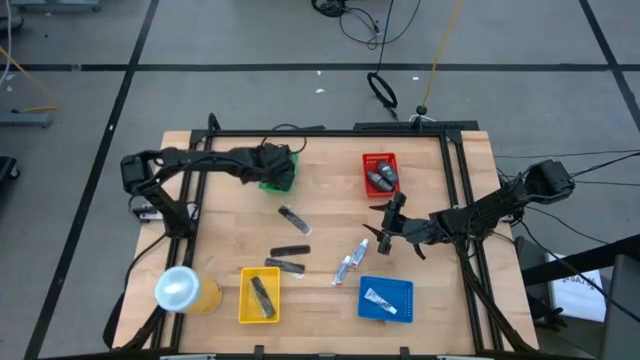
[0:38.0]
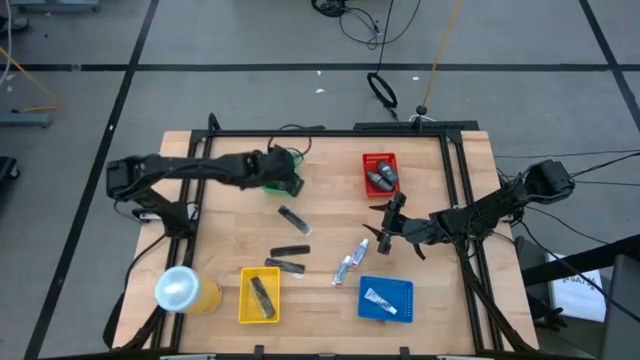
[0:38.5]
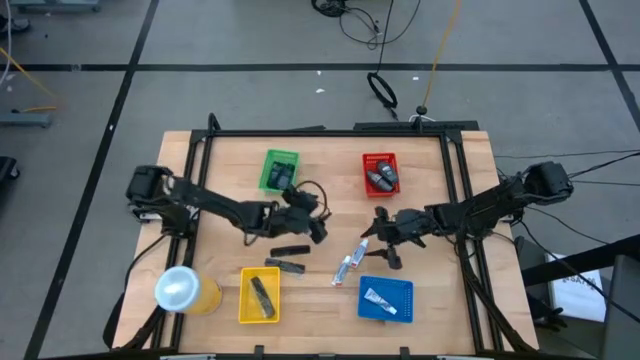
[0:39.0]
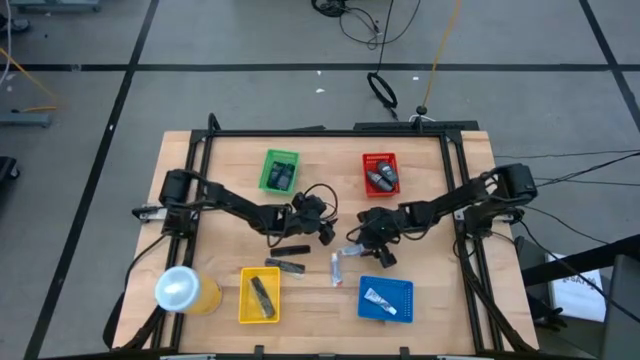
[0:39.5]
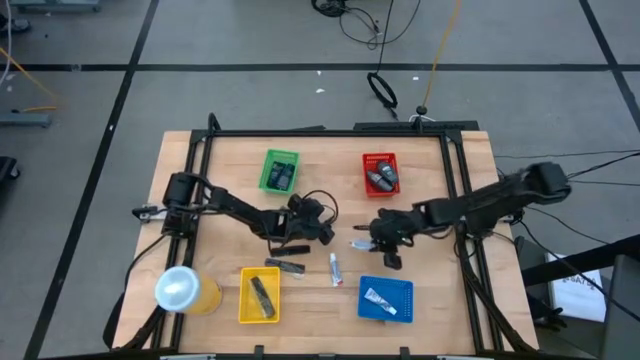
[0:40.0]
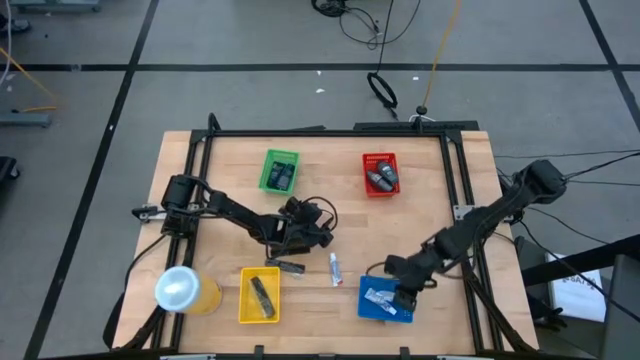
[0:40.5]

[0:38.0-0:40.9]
Task: Pick & Place Travel size toiletries
Put the right white toothpaste into the blue bin

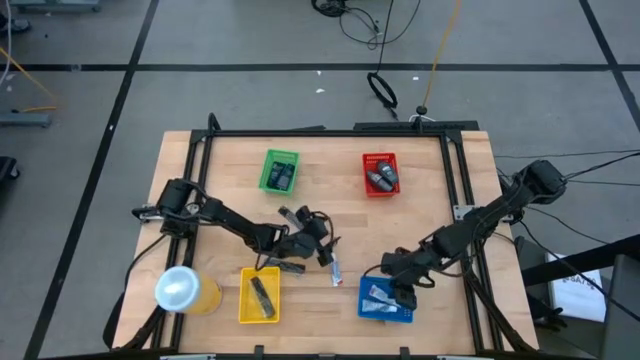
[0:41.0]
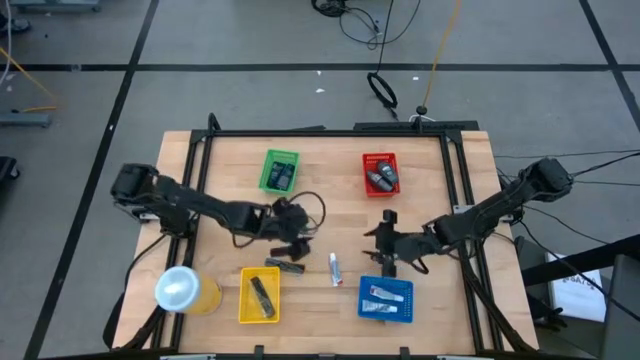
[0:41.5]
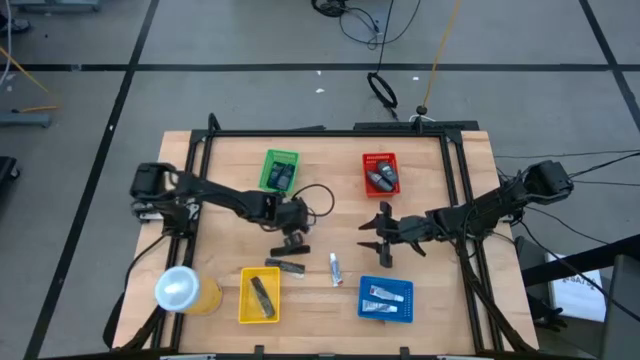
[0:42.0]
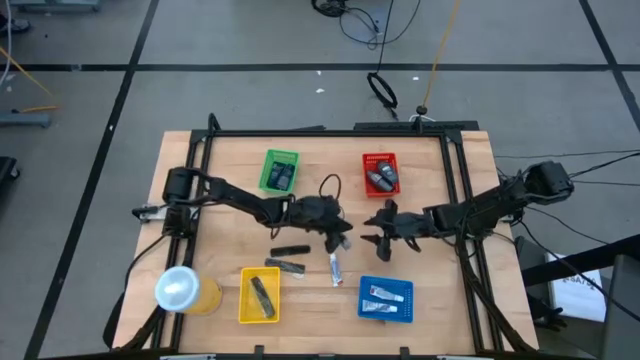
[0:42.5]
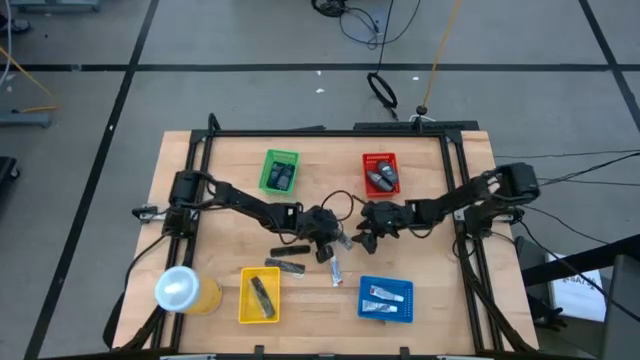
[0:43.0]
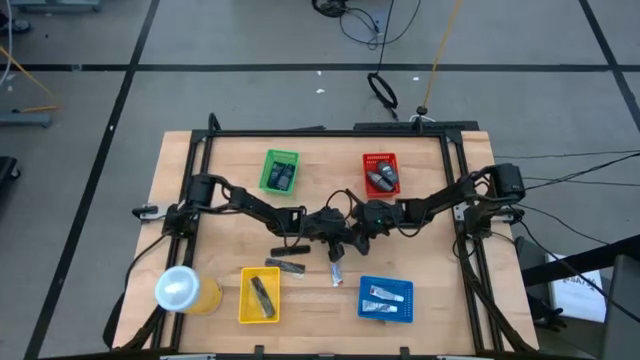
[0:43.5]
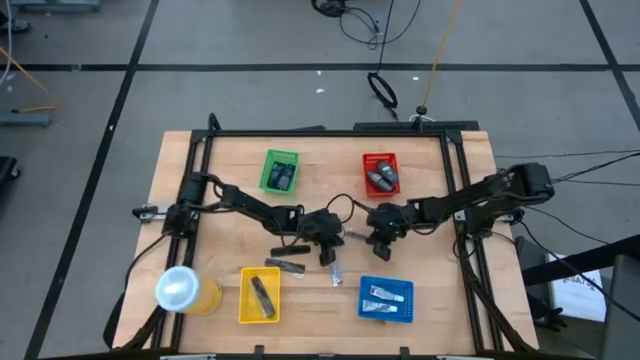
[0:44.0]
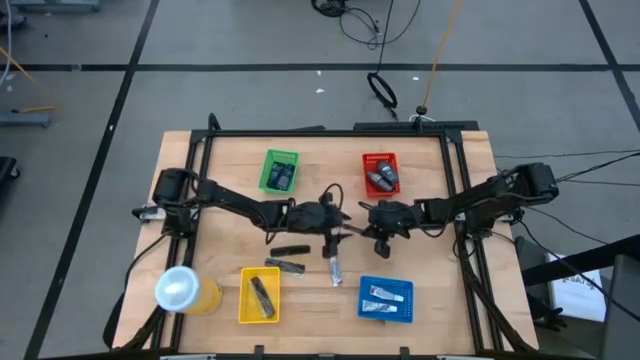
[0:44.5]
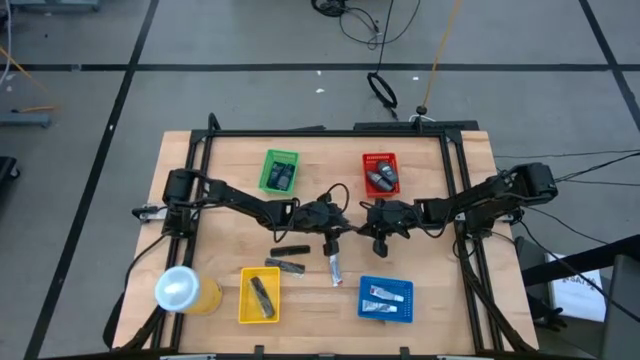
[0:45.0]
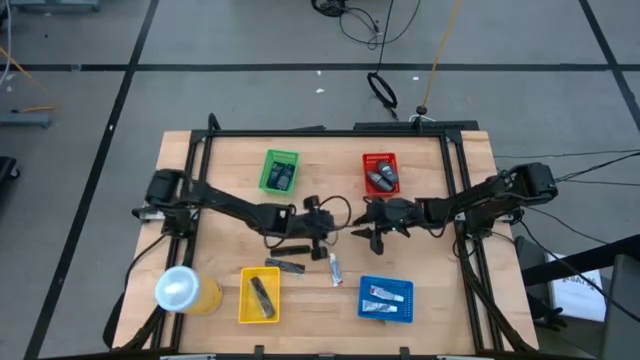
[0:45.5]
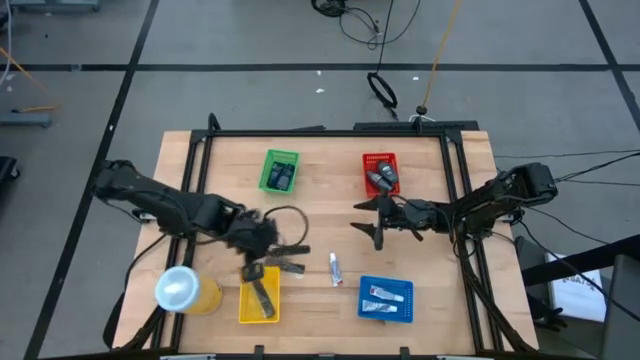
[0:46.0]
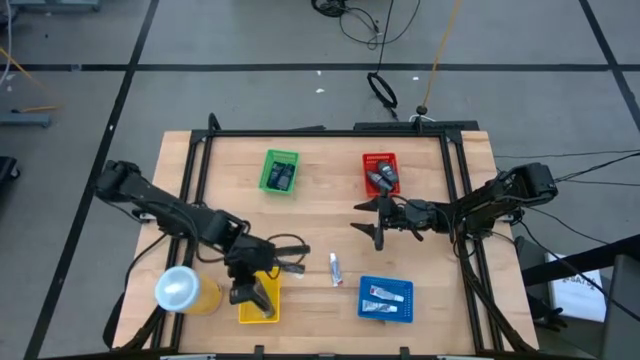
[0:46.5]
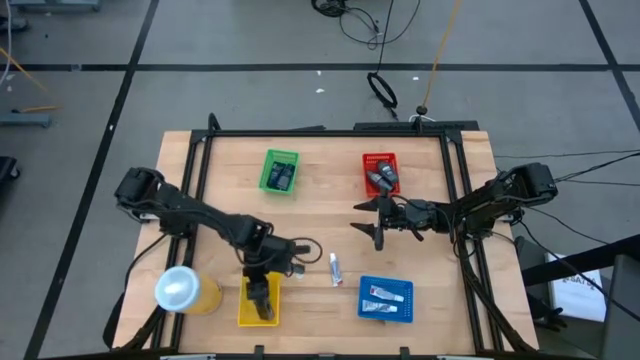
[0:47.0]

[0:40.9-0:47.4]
Put the black hairbrush into the yellow bin

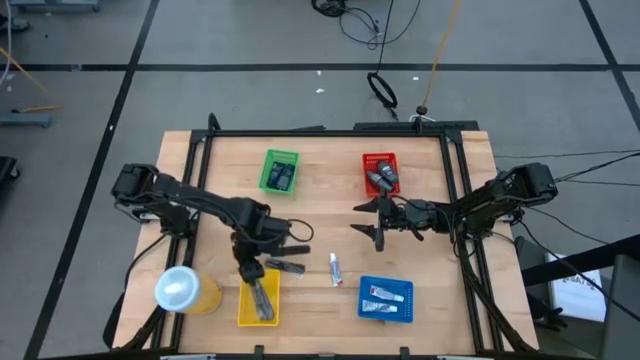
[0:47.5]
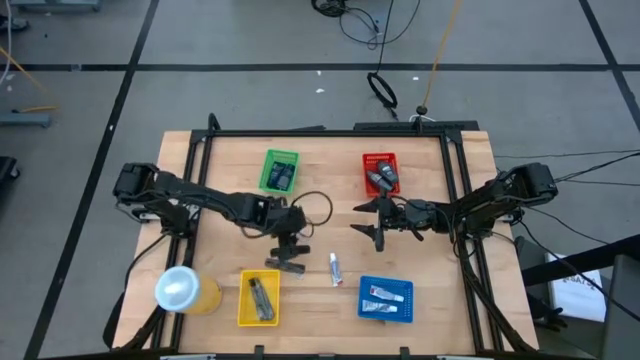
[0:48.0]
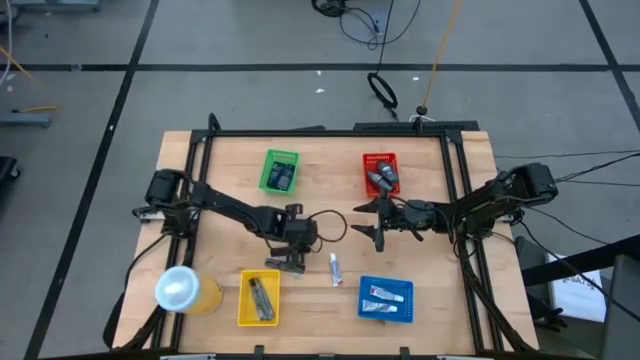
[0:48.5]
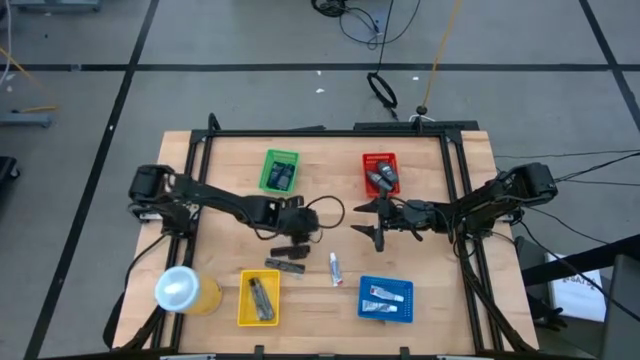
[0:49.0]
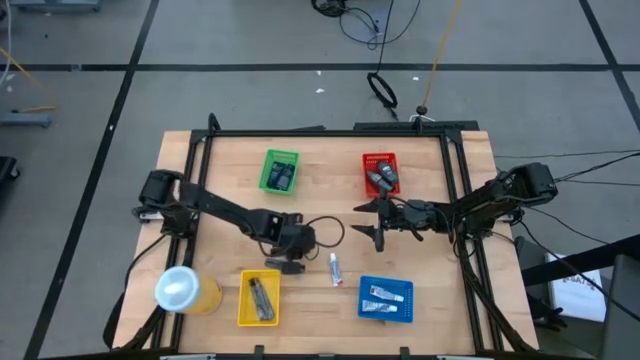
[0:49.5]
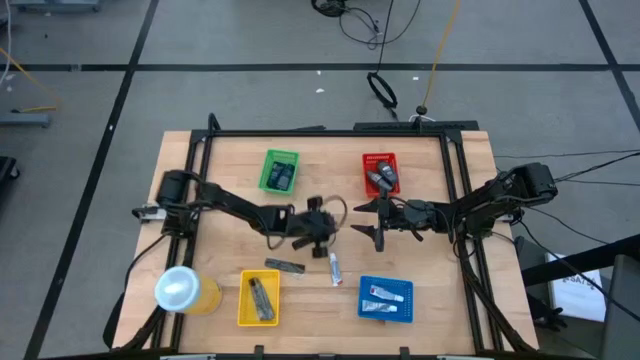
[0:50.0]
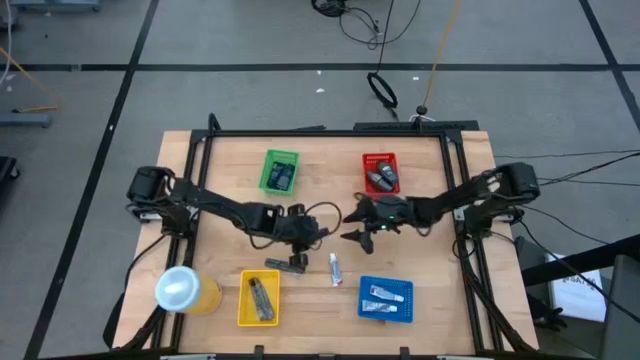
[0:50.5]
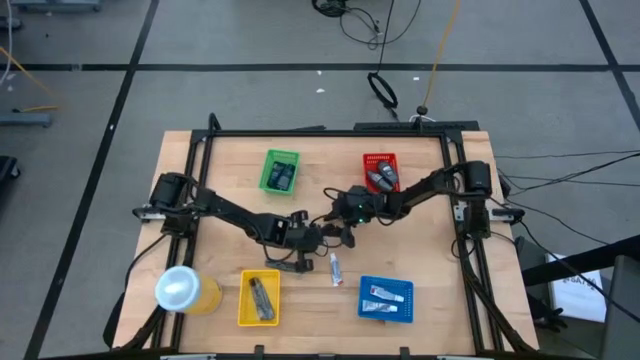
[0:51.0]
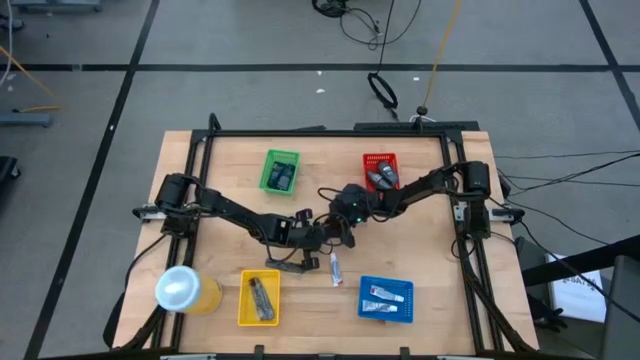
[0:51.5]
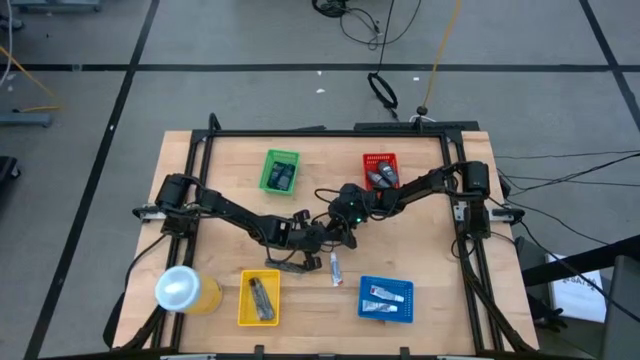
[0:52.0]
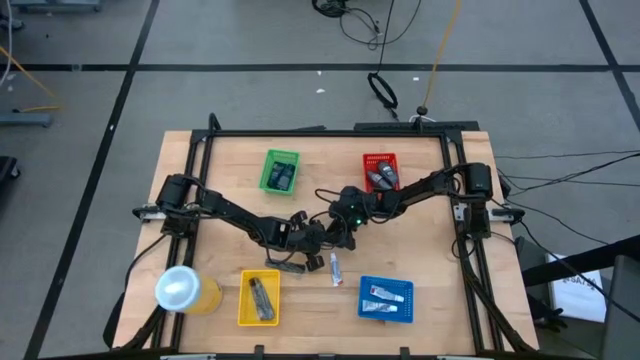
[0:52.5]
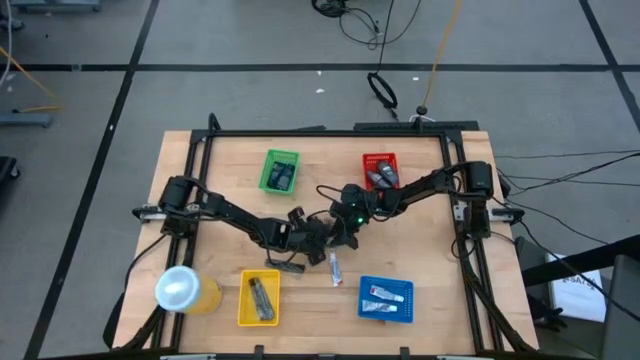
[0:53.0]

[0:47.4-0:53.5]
Put the black hairbrush into the yellow bin

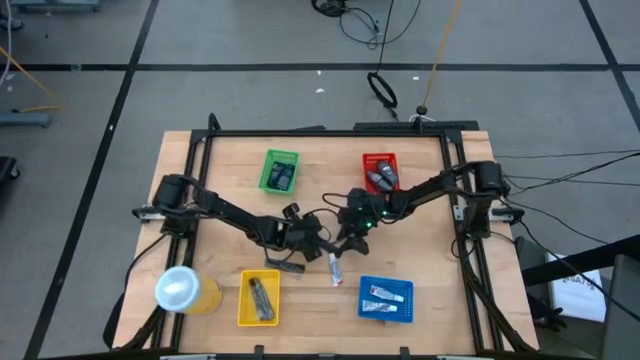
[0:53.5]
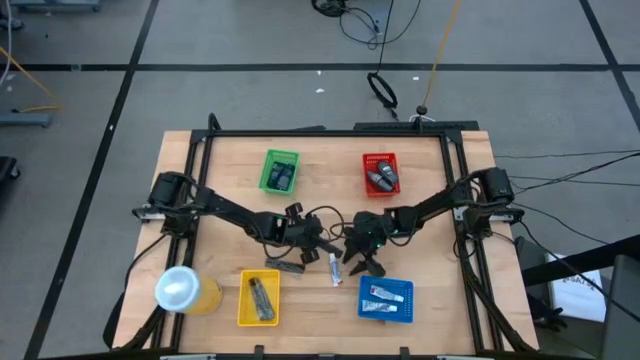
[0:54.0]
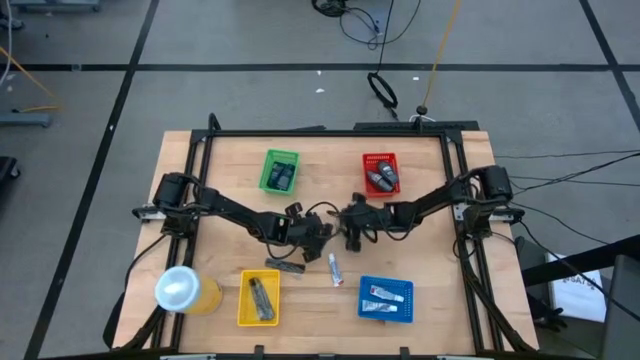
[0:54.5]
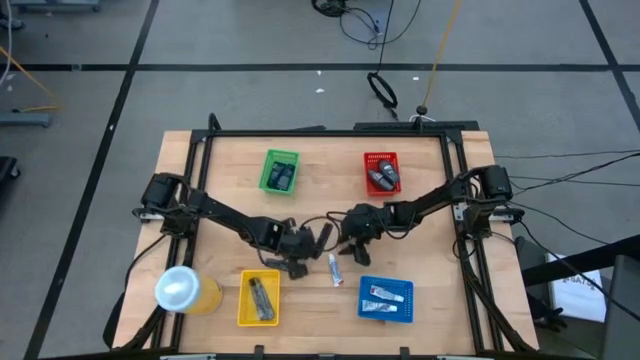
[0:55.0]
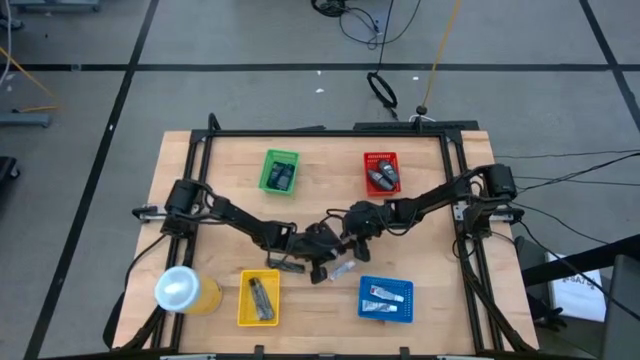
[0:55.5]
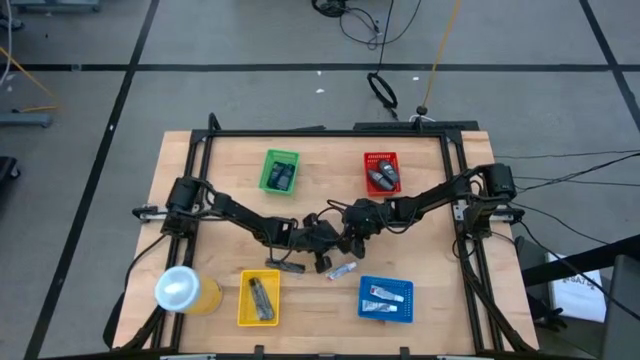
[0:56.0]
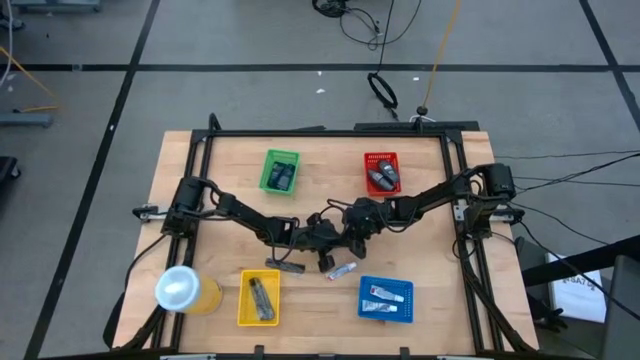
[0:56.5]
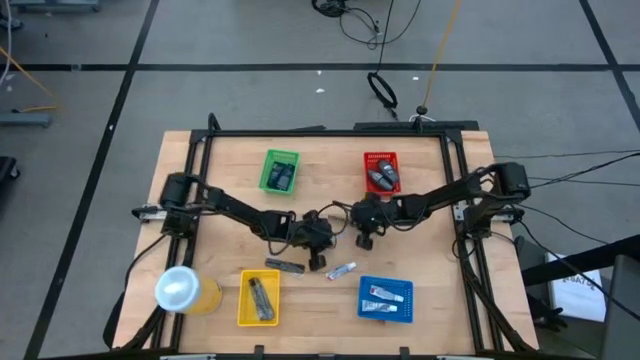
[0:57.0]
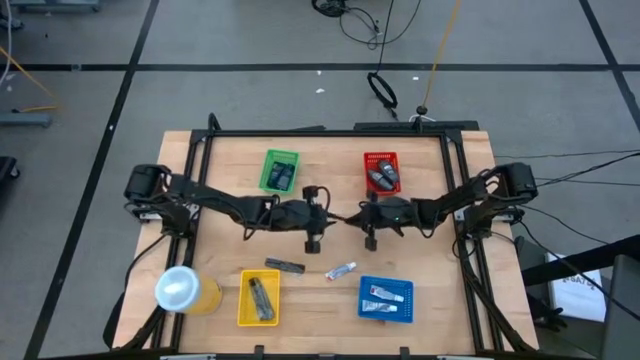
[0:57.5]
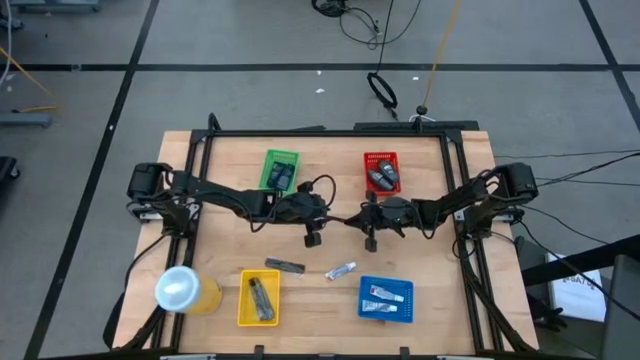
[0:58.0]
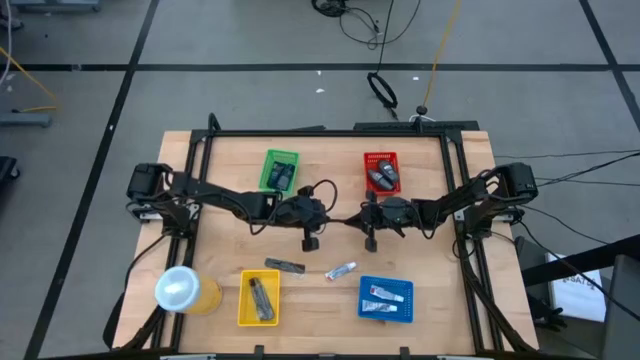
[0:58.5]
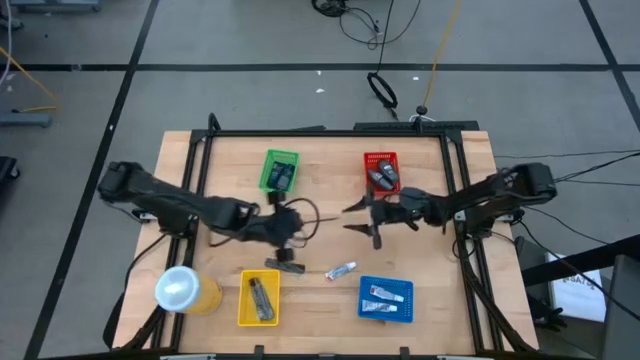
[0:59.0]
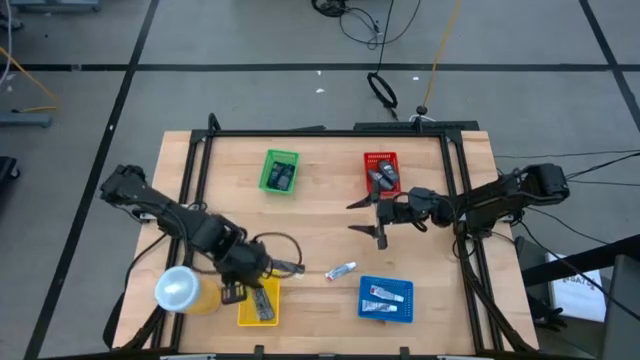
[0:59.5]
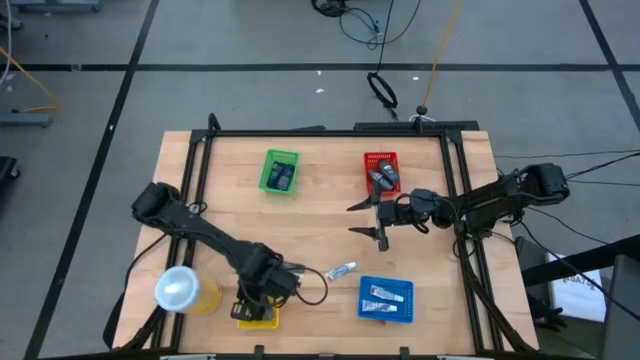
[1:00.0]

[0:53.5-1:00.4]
Put the black hairbrush into the yellow bin
